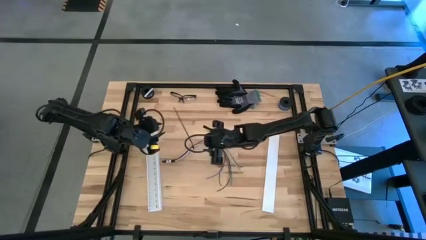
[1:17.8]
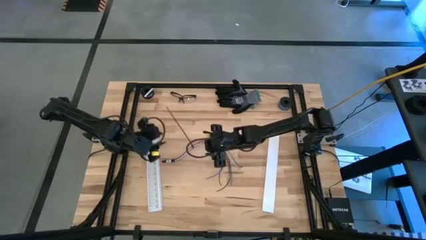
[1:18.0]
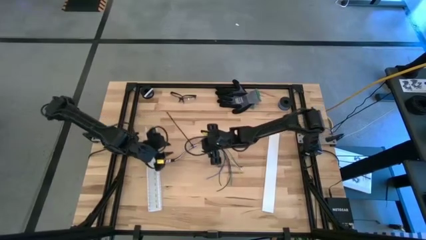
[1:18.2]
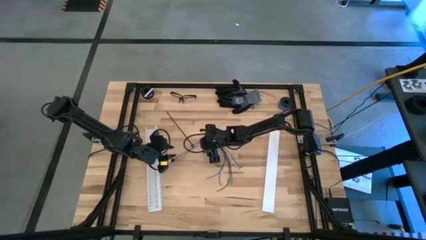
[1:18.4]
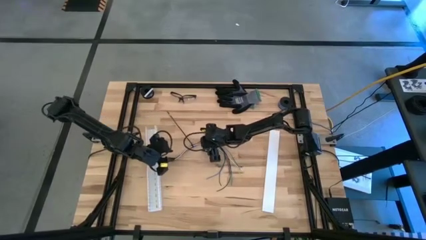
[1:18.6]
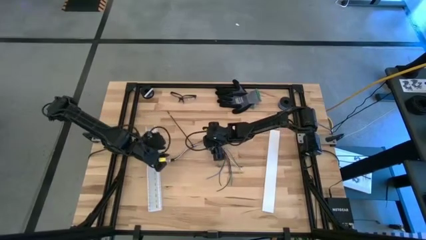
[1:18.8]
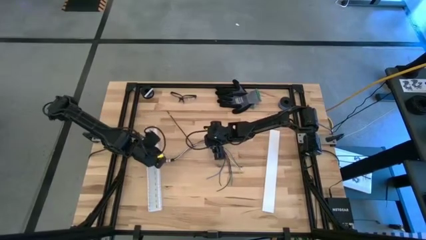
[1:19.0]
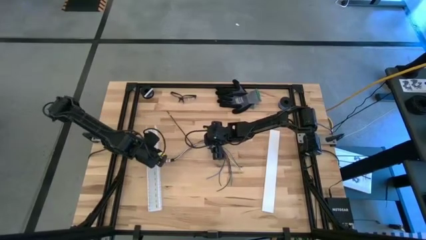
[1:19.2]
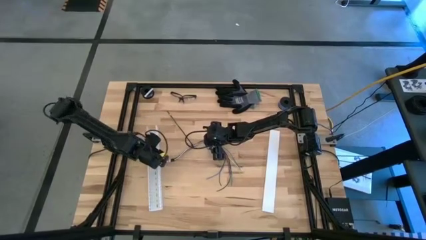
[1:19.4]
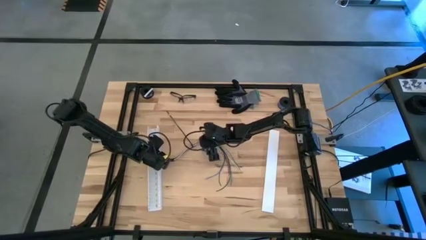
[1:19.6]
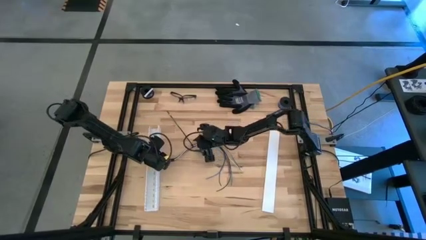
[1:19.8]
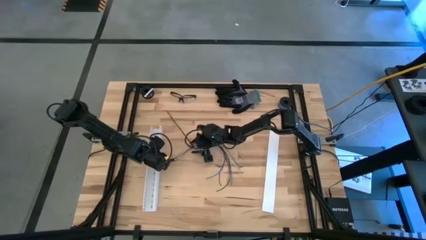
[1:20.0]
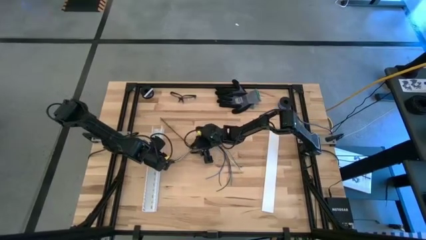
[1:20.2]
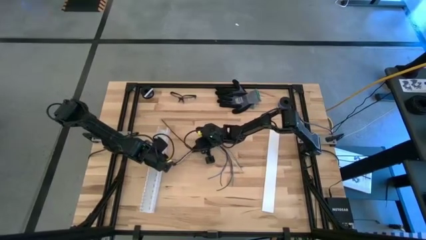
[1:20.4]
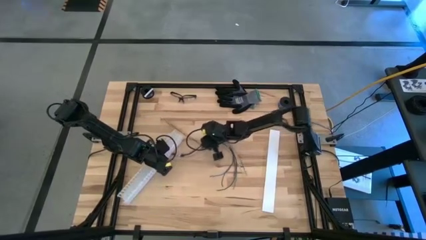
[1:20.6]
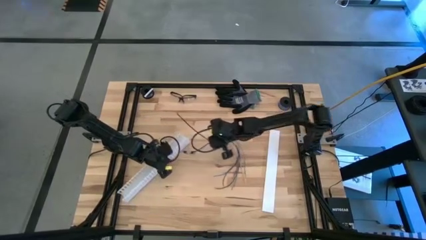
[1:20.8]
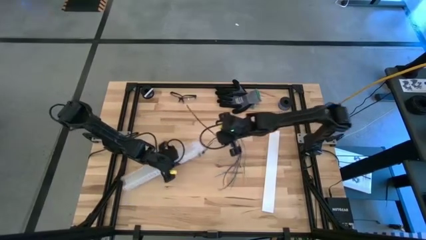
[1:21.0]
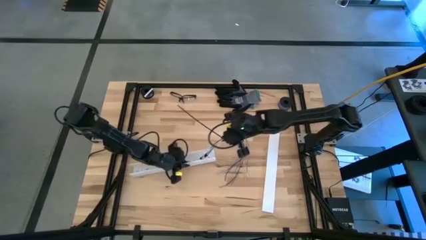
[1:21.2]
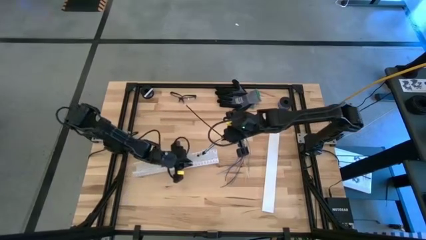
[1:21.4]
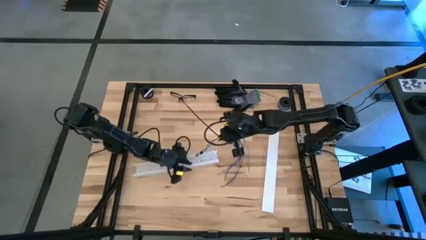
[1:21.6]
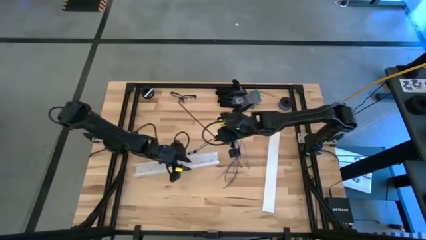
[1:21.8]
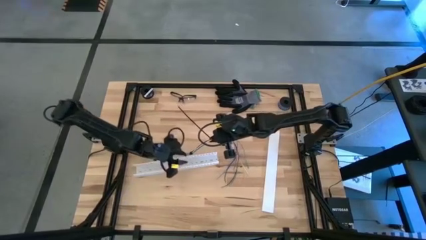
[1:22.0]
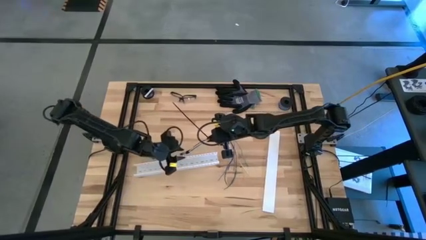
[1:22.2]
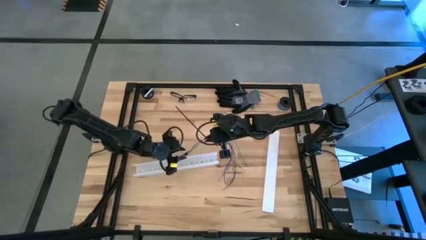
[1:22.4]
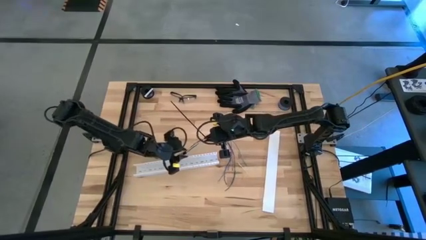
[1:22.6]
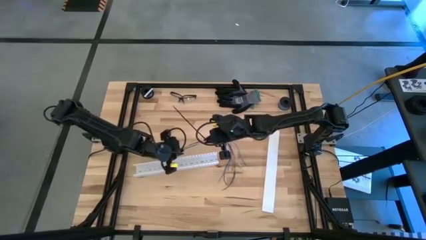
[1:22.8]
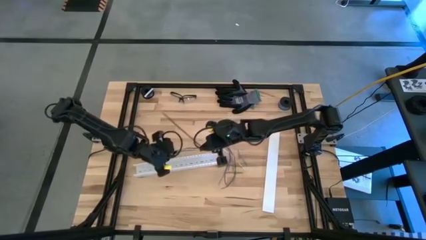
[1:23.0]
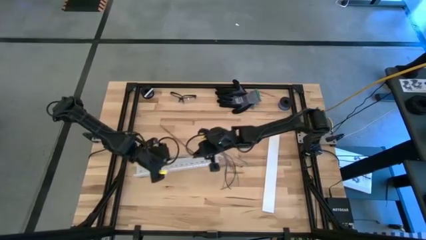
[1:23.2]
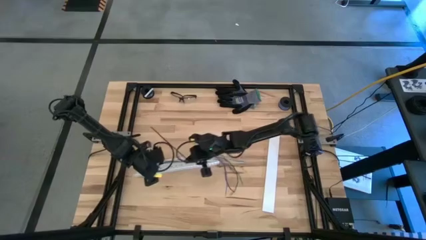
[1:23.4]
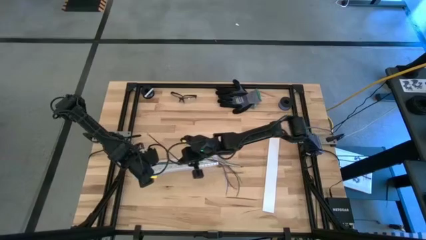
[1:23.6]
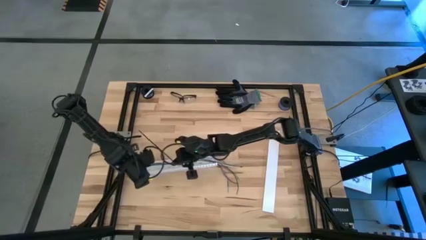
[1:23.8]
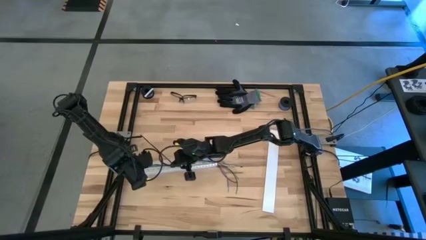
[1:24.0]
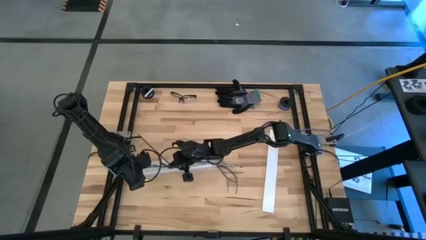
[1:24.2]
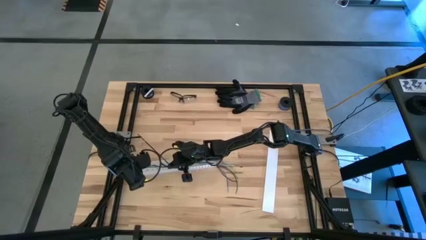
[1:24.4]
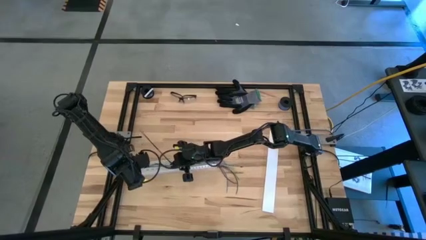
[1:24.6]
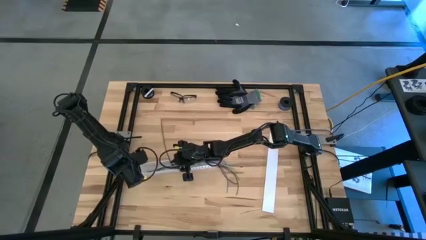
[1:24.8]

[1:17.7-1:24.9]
Task: Ziptie cables
Put the cable wire into the cable duct

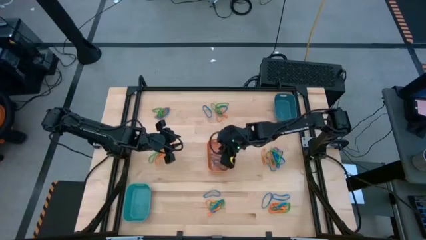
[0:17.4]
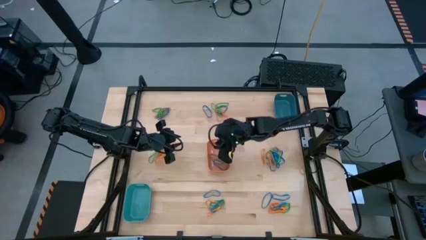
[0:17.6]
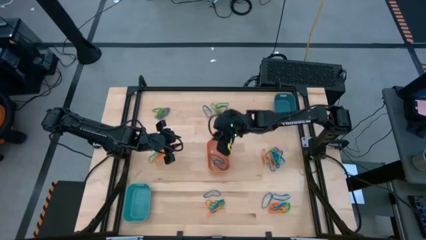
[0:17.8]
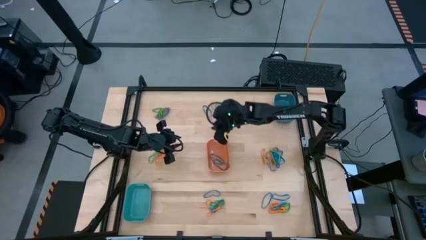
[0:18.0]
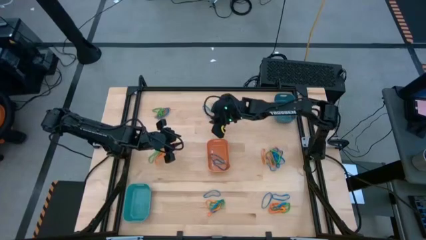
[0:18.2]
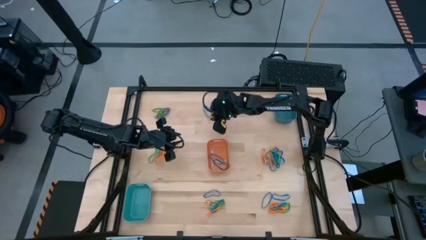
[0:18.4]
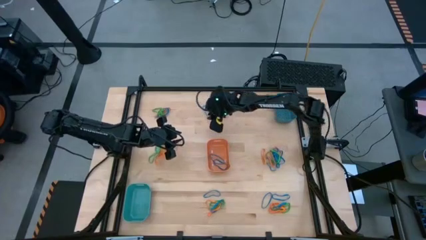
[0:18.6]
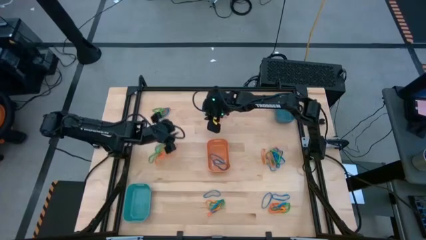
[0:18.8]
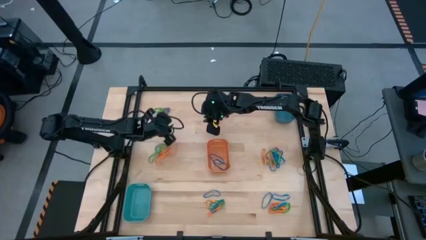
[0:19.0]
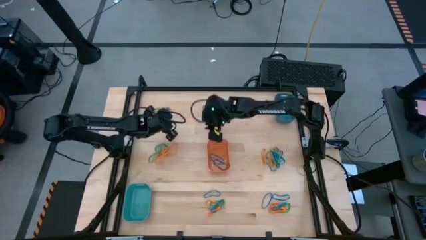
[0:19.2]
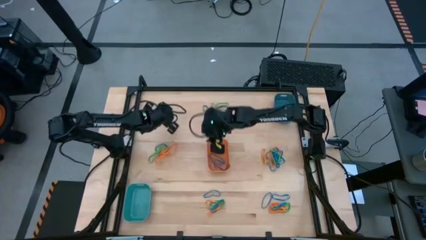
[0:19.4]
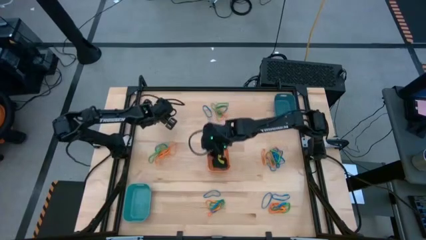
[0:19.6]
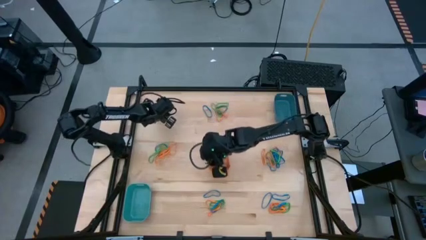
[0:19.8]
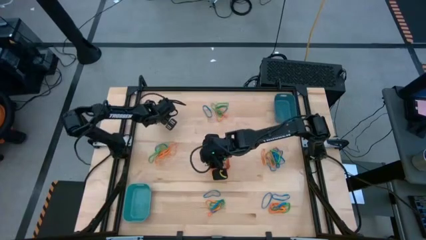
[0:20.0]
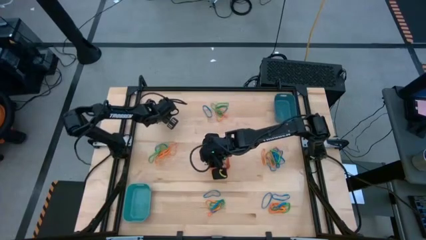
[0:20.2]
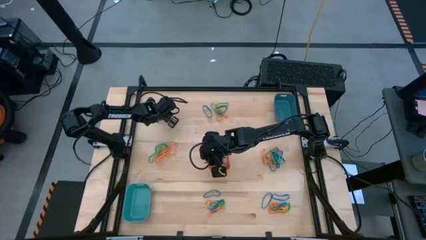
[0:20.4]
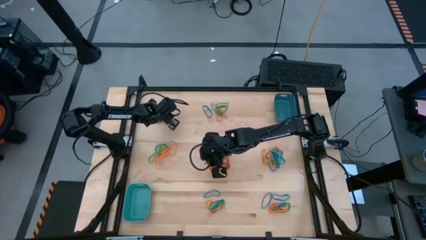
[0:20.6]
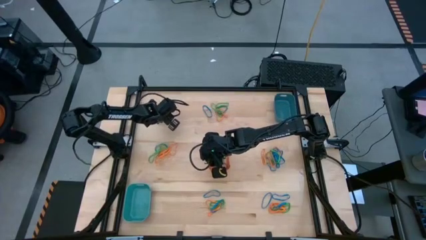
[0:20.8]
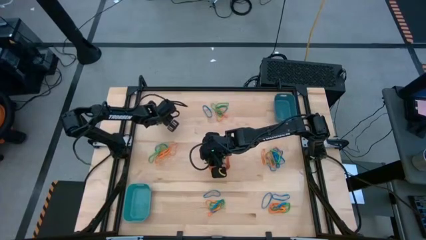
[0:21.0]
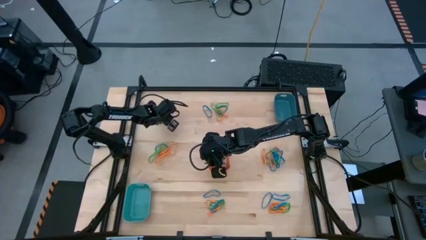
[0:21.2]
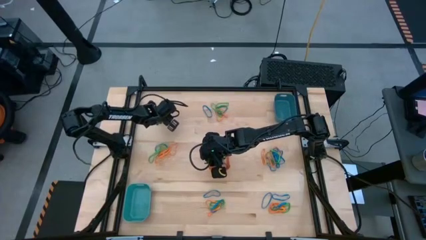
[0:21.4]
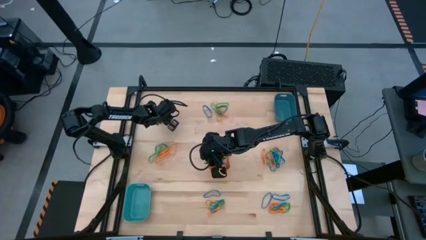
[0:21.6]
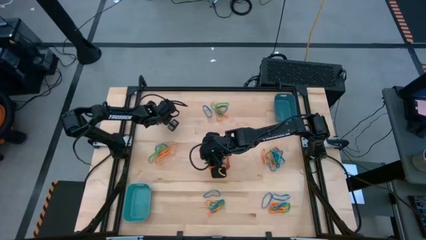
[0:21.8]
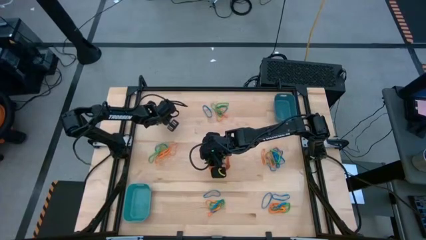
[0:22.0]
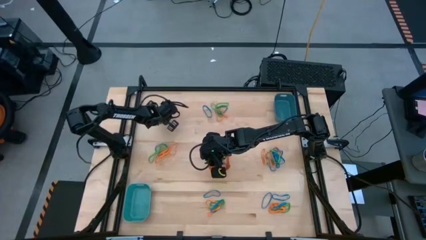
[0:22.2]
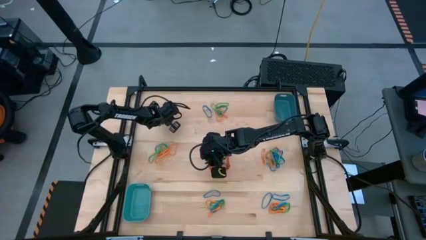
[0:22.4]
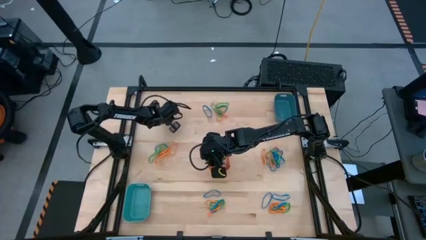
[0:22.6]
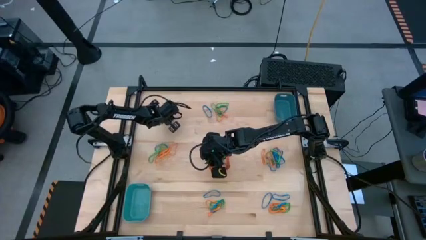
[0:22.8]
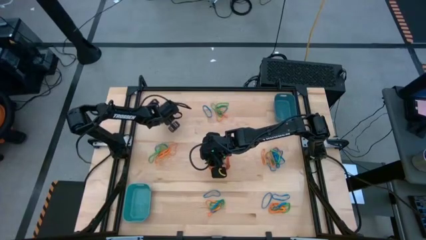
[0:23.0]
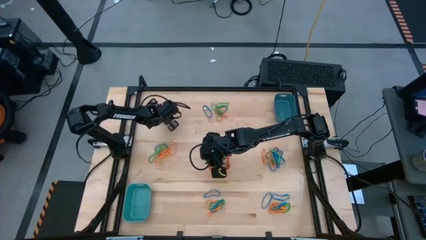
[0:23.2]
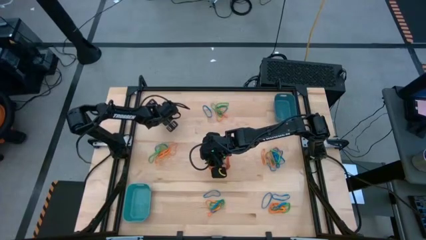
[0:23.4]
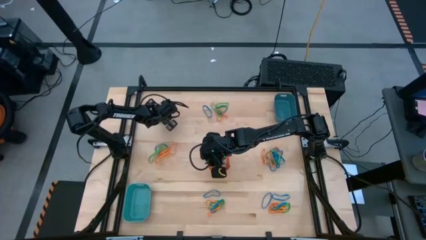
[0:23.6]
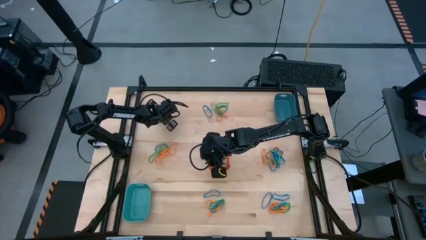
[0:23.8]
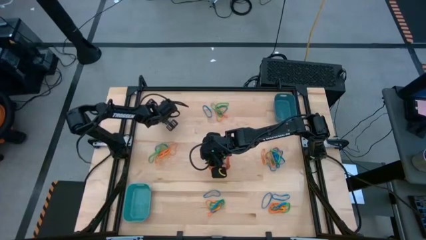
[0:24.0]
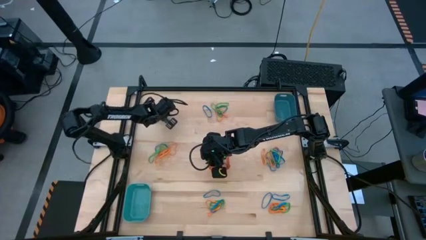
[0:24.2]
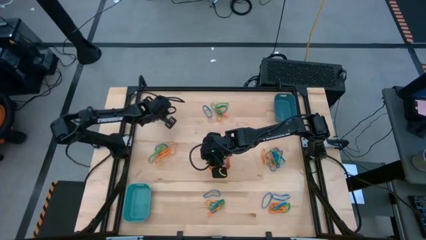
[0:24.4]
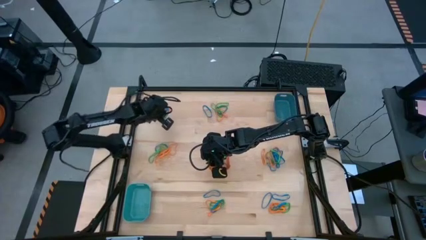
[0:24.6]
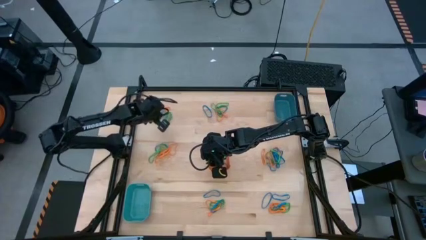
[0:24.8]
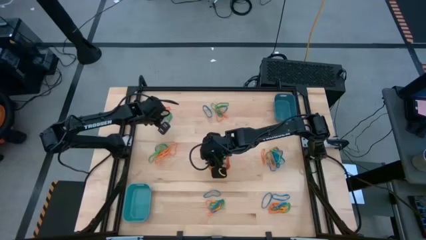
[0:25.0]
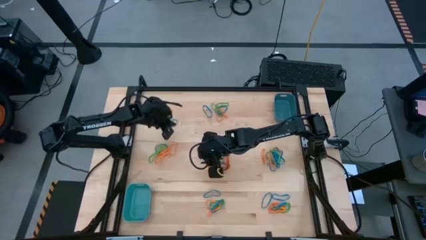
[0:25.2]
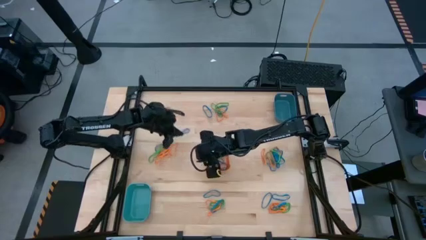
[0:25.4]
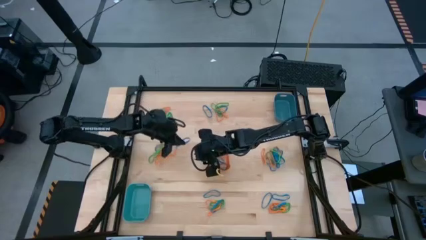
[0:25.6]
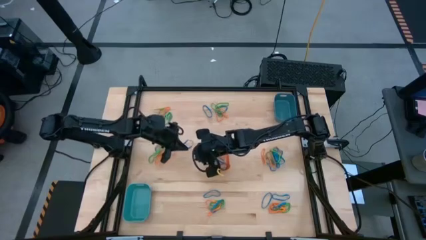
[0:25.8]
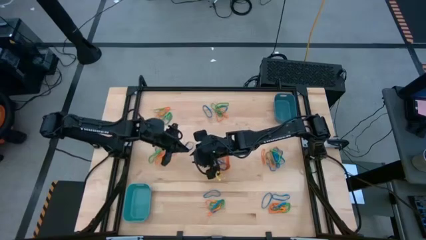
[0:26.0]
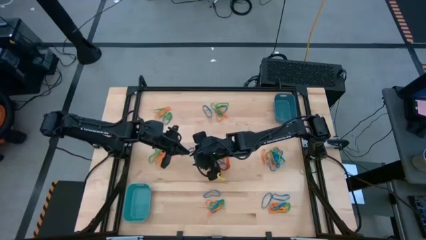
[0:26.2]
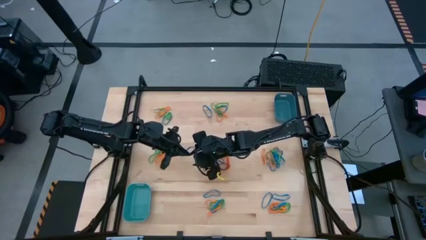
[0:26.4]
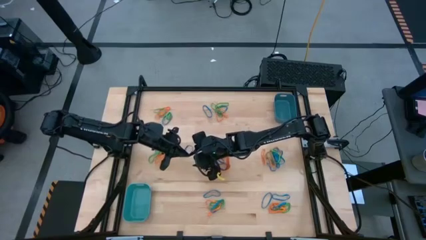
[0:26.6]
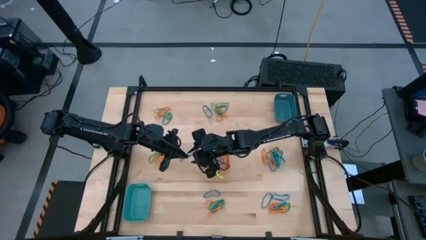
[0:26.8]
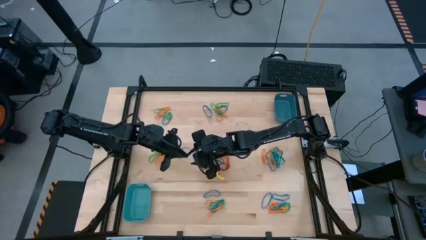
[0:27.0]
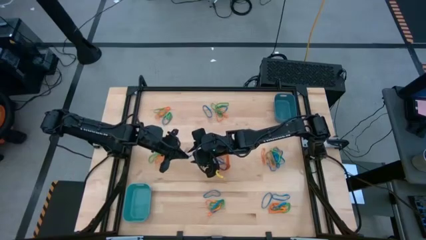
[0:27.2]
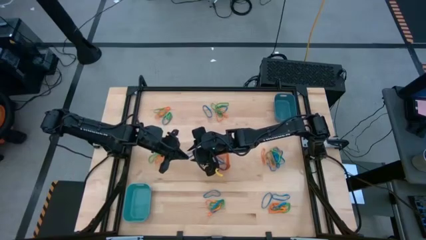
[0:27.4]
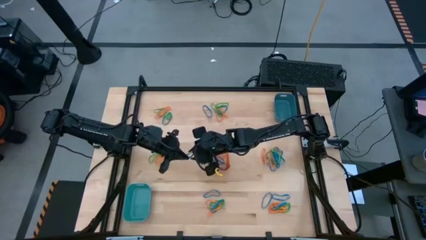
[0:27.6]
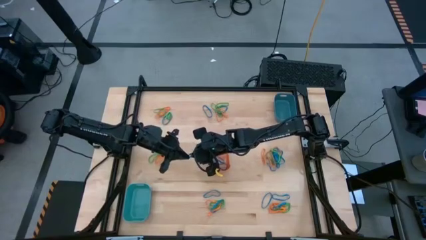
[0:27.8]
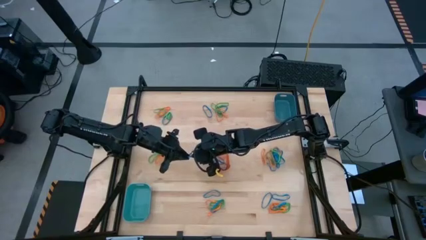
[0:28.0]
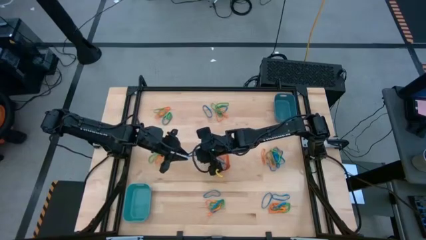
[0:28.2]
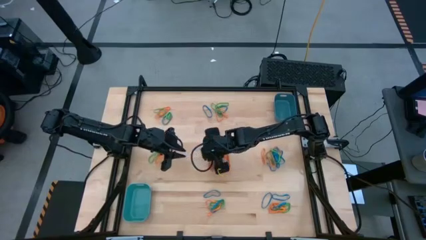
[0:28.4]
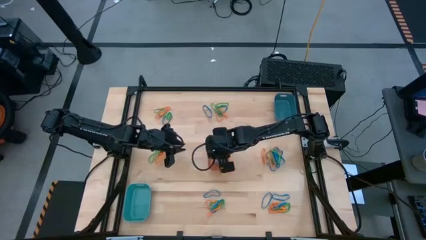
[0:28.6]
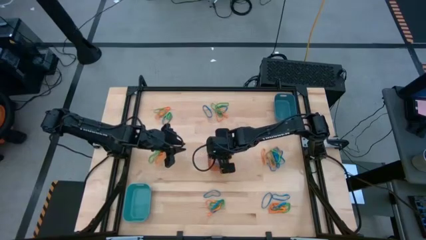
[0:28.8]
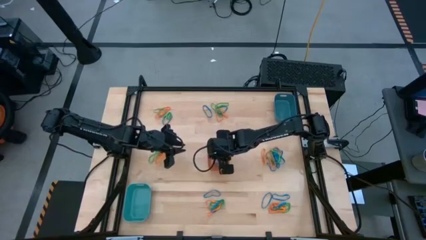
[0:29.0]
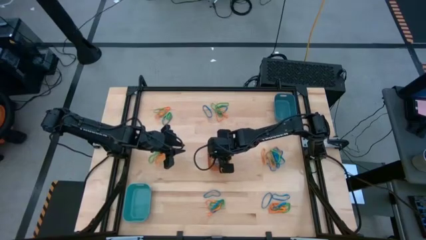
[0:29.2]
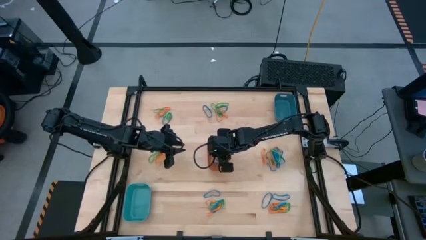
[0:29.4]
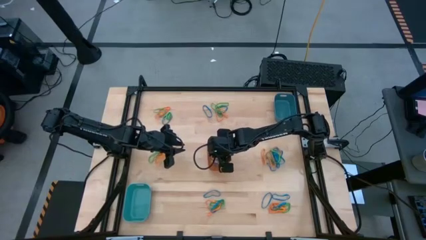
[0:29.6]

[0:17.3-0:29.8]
Task: Sort rubber bands into baskets
Put the blue rubber band into the orange bin
